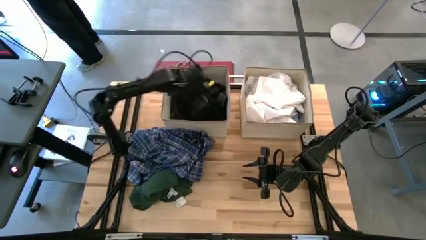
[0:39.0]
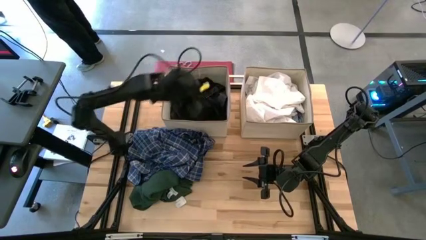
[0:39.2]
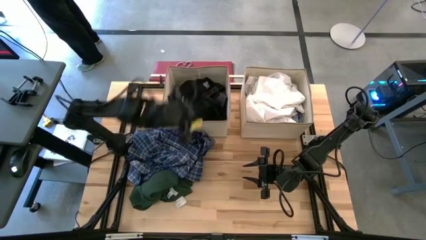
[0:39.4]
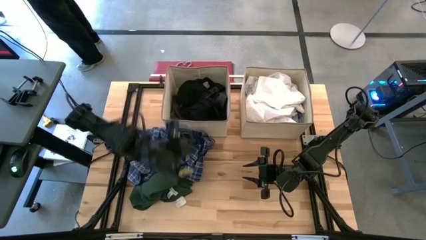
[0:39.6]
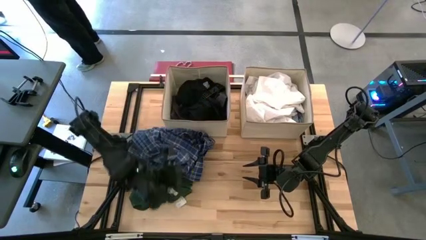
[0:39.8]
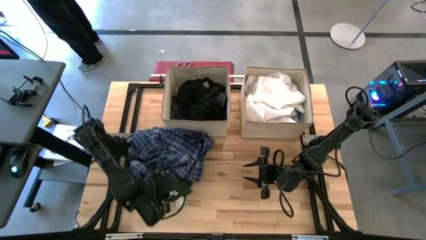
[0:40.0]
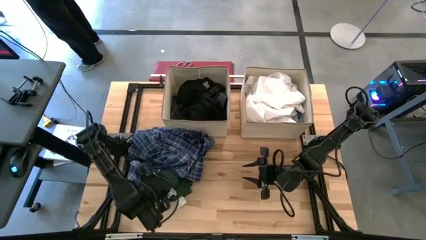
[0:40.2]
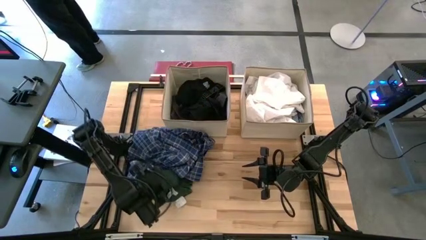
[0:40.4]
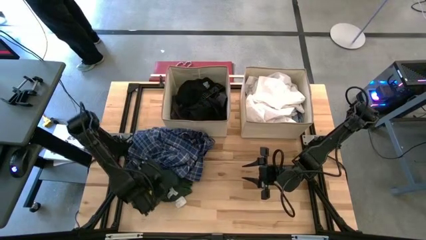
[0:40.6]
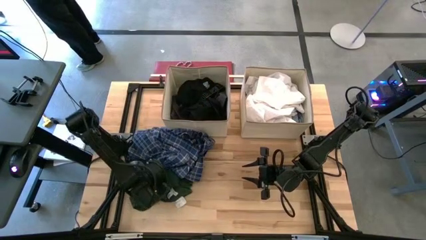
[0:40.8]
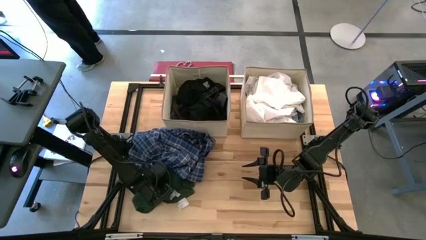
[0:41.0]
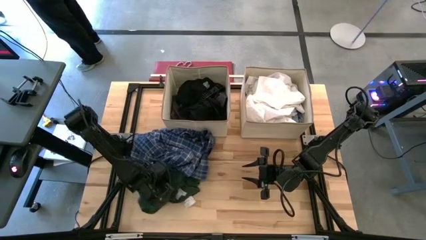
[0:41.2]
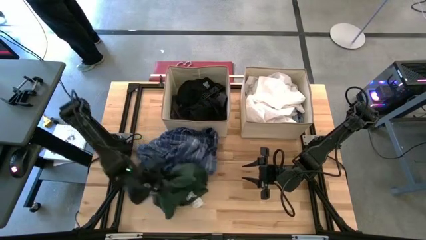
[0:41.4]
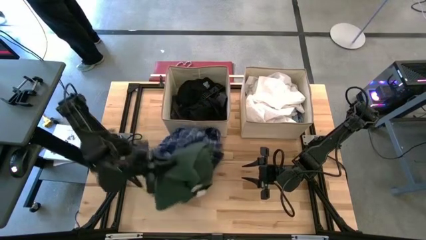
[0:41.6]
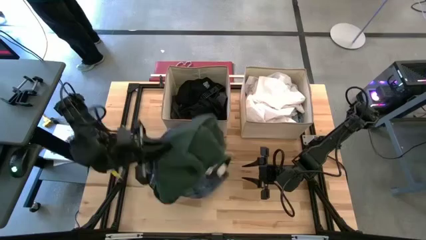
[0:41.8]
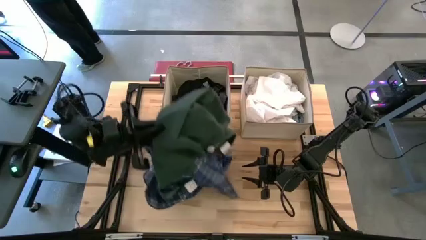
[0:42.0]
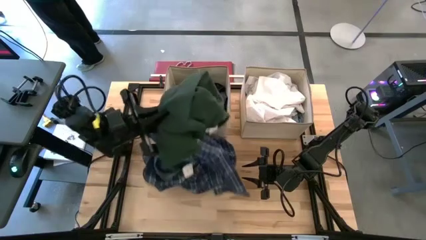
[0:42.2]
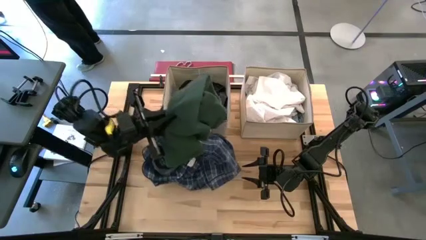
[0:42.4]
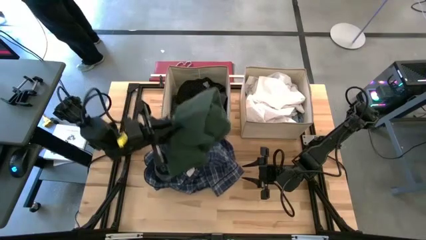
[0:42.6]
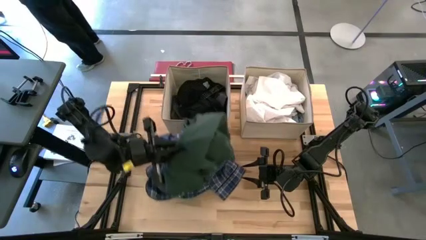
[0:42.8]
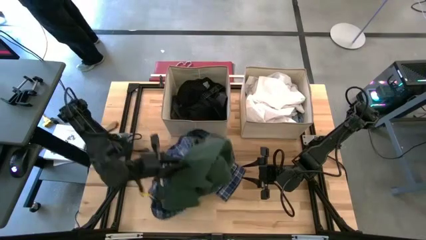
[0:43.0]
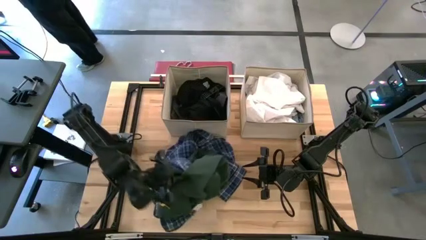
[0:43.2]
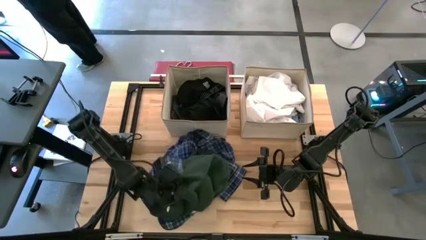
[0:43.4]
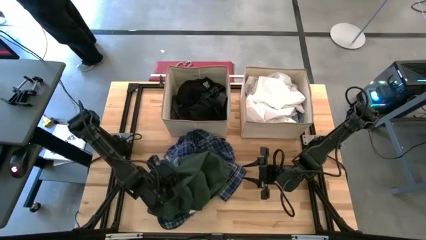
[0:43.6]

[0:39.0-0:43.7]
Task: Sort clothes
Put the green towel into the left brown bin

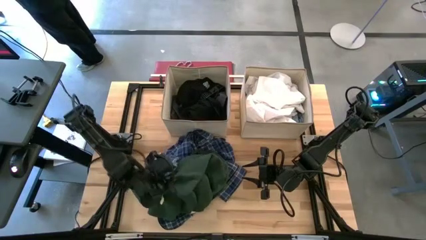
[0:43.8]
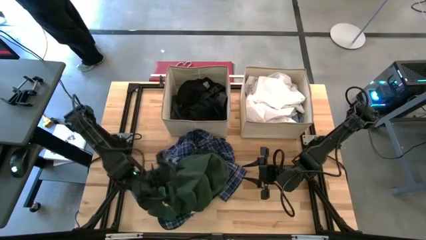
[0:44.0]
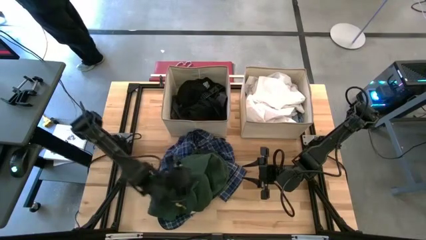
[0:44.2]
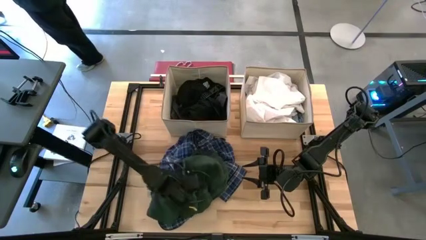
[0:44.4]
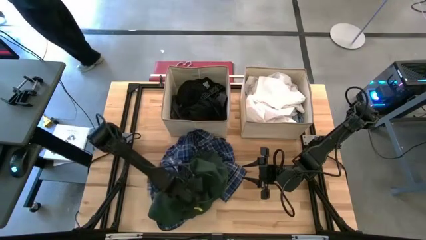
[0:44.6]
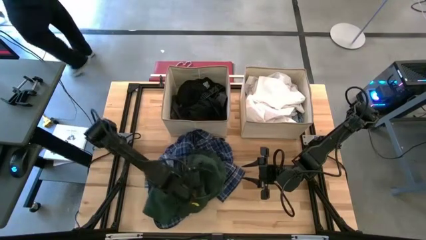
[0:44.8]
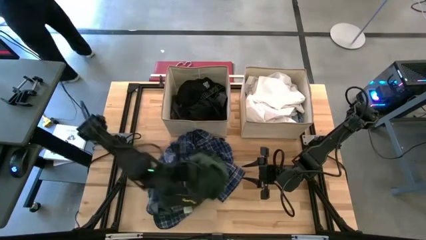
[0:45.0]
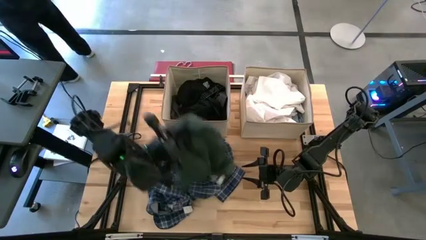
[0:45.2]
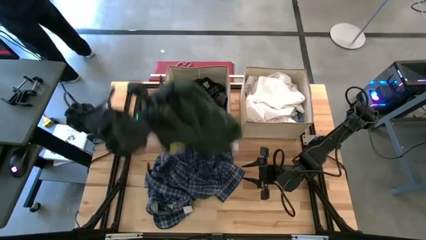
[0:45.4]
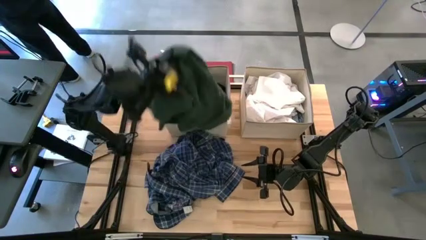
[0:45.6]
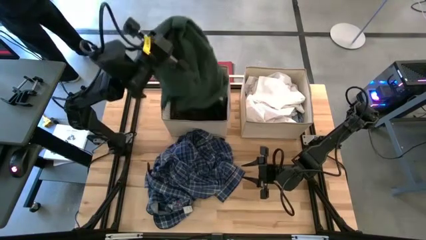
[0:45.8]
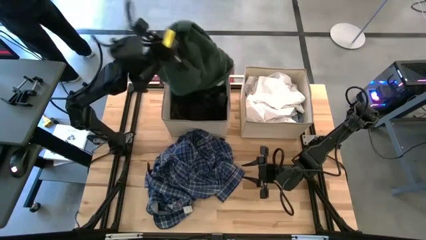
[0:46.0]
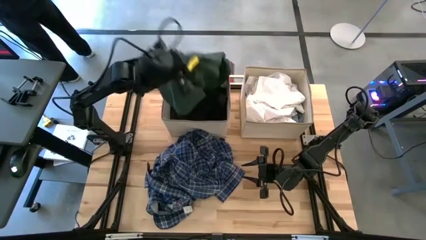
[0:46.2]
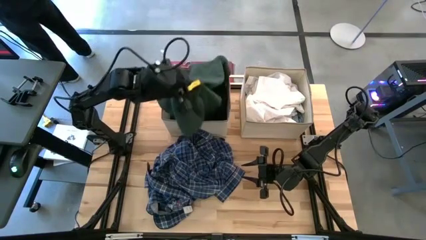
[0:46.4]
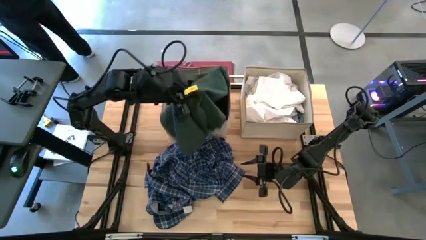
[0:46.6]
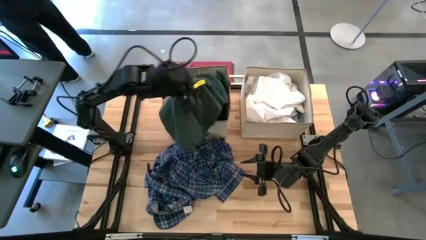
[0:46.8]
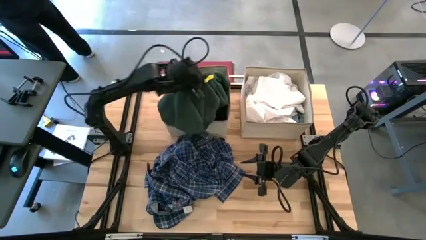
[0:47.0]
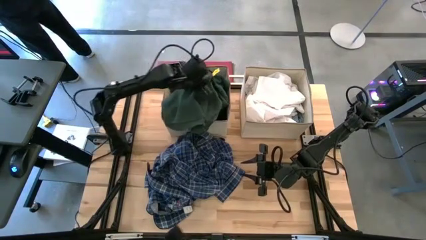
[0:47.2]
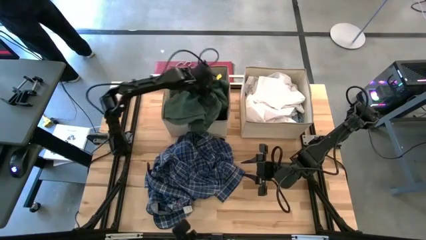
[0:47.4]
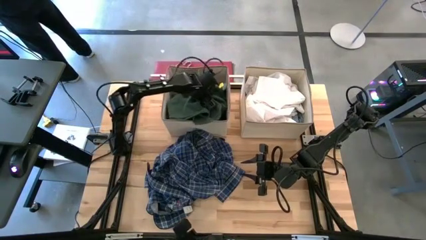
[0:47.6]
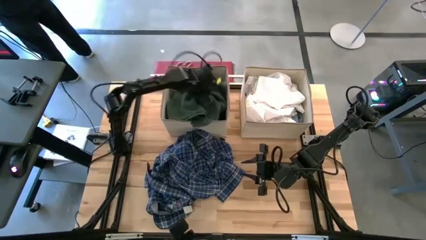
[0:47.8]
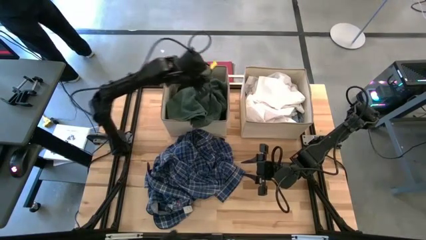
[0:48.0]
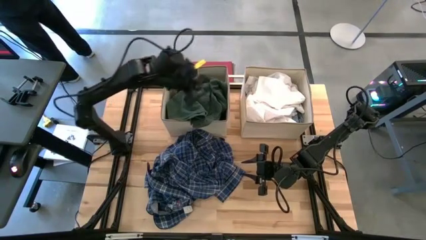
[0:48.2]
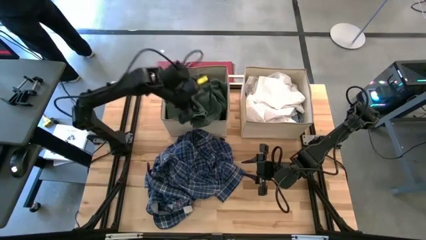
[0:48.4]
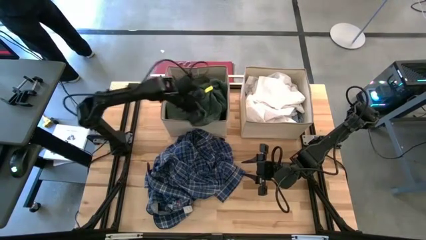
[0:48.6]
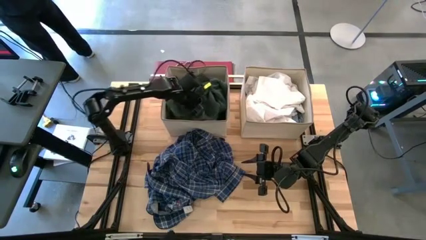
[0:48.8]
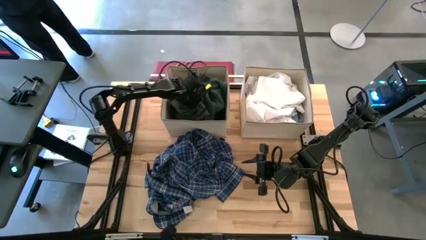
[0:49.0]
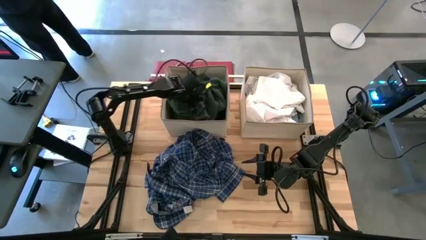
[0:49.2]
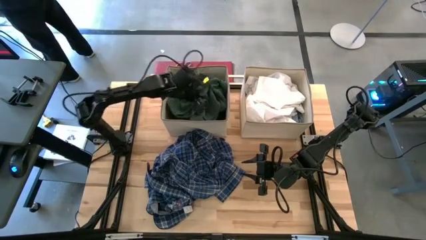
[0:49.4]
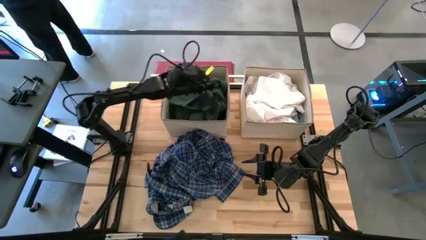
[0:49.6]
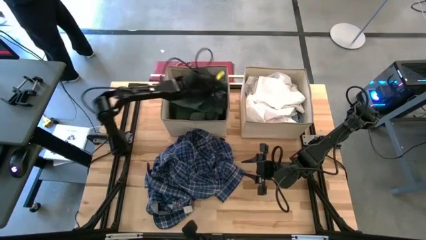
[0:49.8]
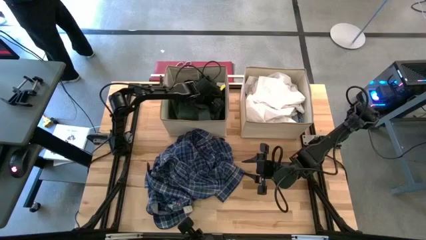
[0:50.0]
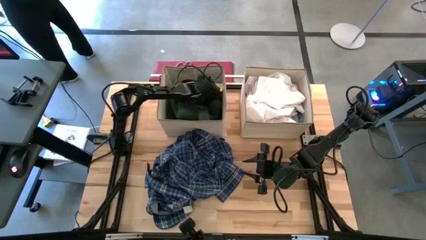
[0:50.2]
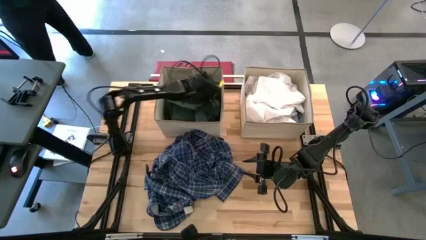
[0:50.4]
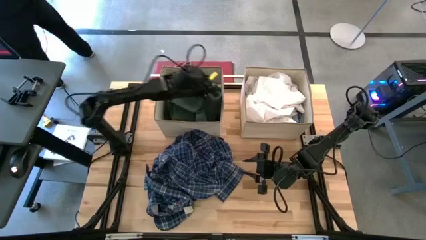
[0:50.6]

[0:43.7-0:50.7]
Put the green towel into the left brown bin

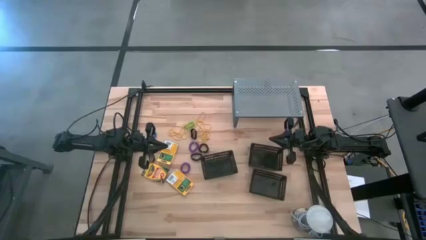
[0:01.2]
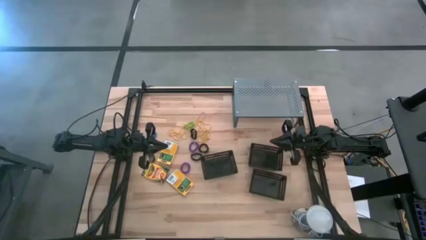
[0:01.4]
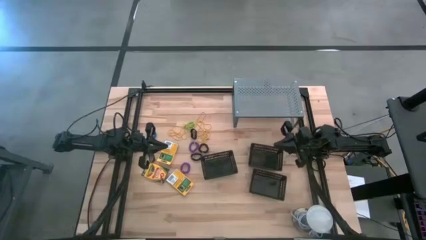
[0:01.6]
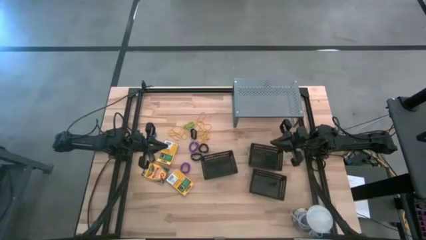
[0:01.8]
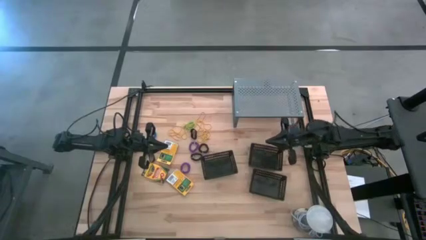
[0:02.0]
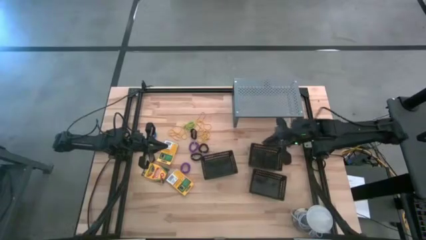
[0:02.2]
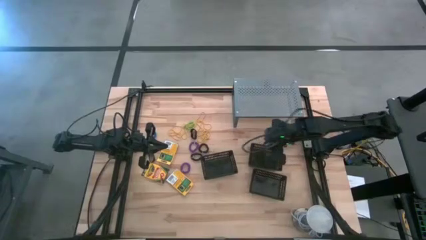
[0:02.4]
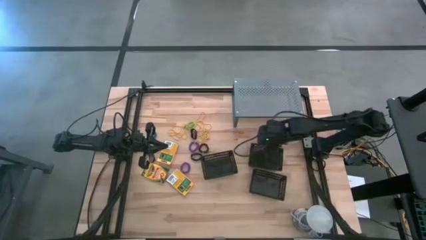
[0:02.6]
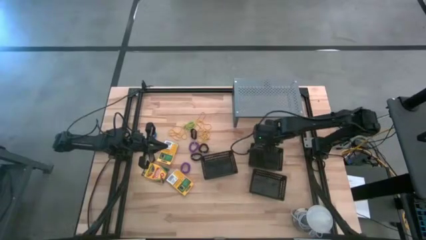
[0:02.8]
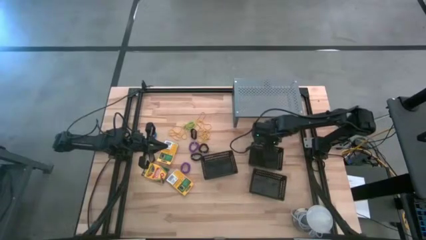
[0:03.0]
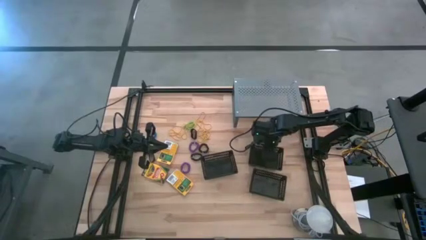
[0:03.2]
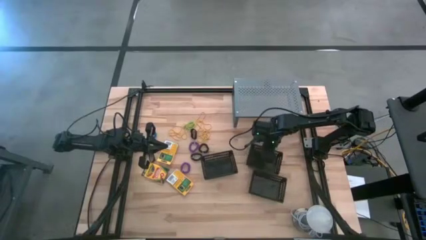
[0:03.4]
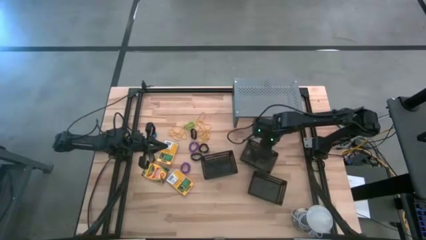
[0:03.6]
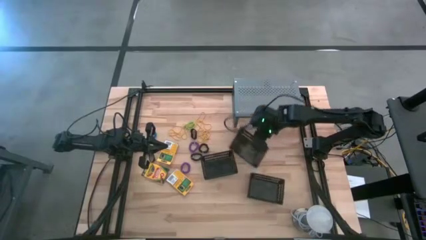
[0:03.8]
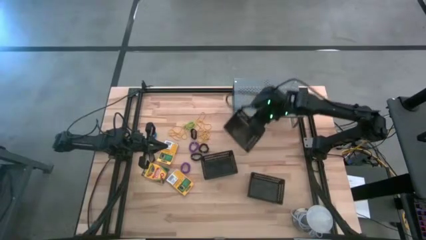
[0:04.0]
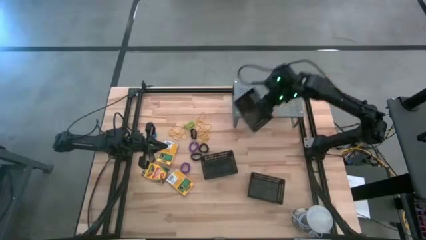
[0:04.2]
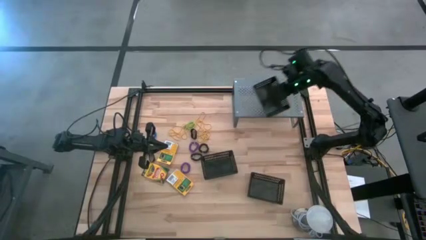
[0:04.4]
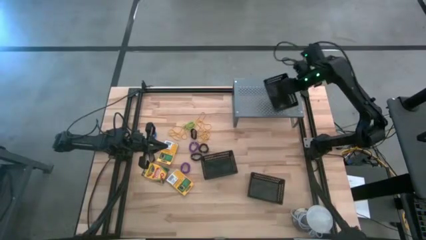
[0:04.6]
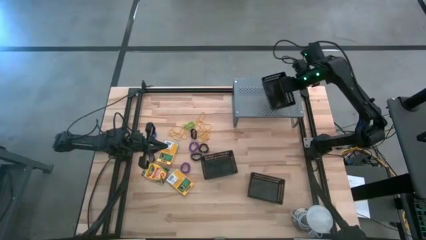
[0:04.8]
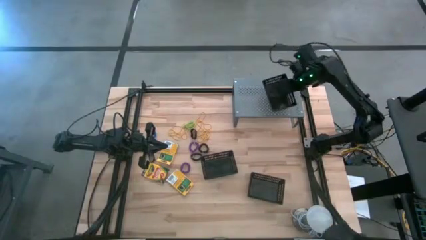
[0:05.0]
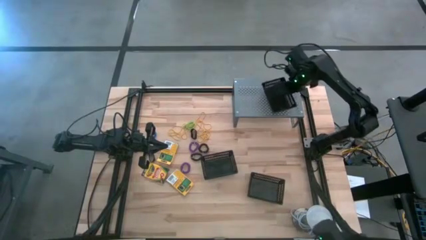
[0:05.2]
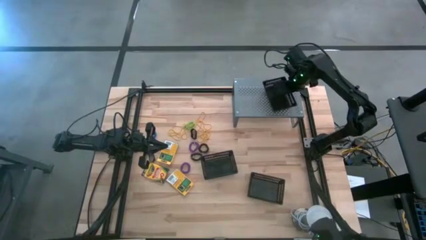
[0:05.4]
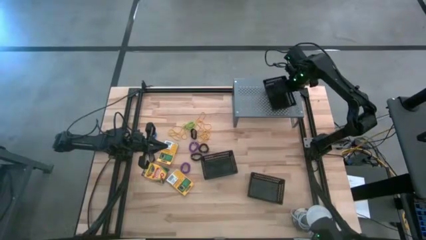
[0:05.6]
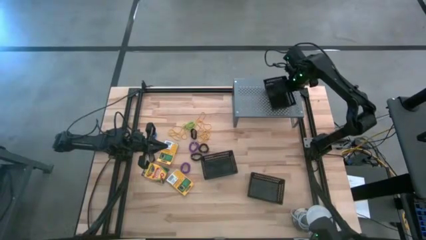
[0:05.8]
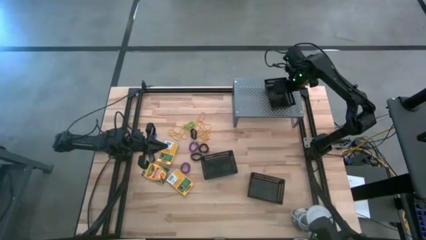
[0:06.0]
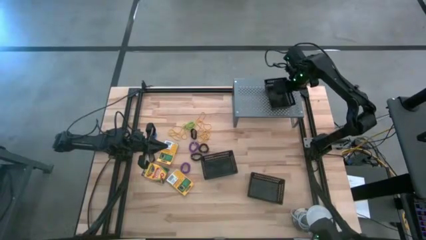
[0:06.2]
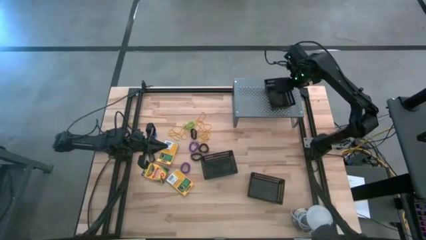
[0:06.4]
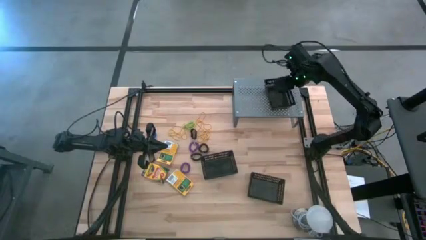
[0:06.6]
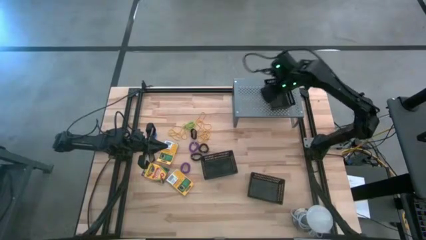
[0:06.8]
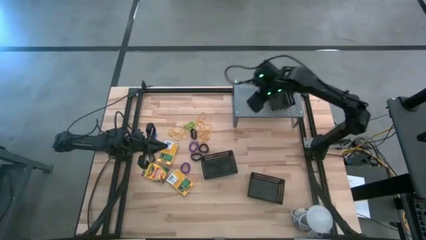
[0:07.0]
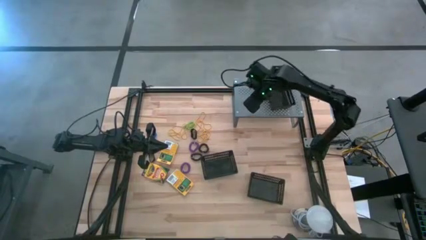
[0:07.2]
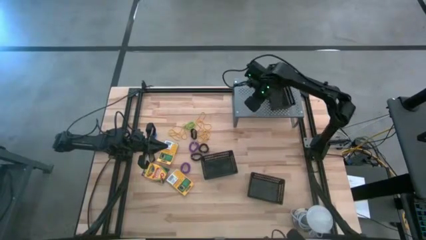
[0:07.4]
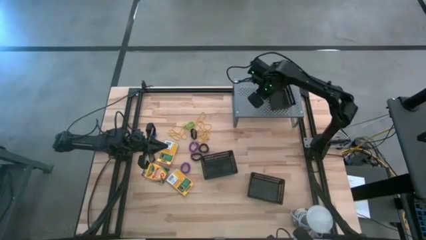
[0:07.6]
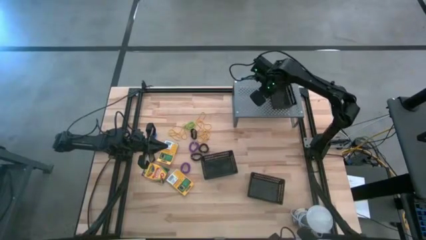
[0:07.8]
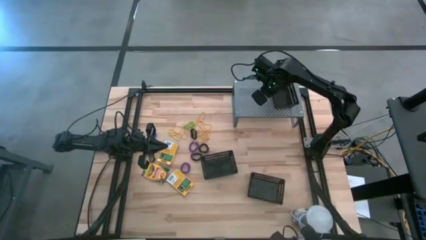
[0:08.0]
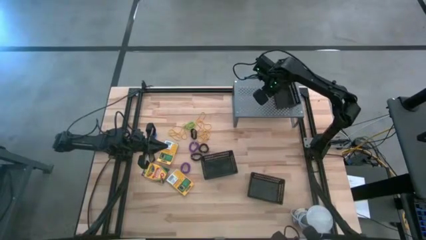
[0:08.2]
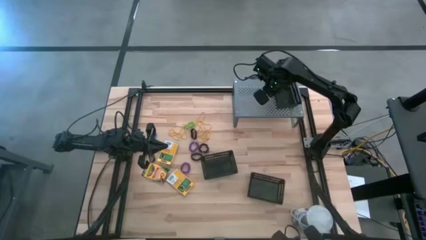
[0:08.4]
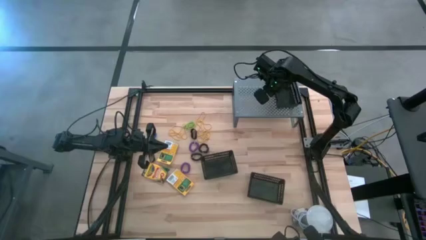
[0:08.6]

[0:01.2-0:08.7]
Task: Pick & Place Office Desk Supplies
Put the top right black basket on the shelf
